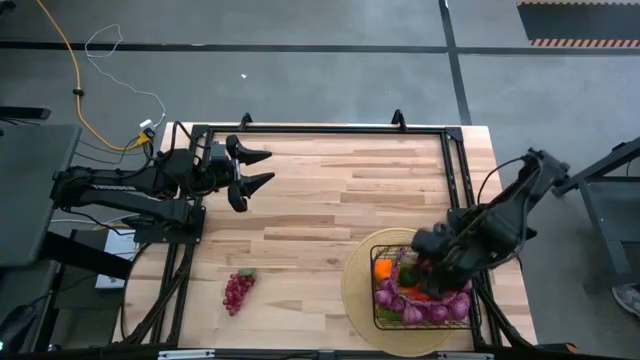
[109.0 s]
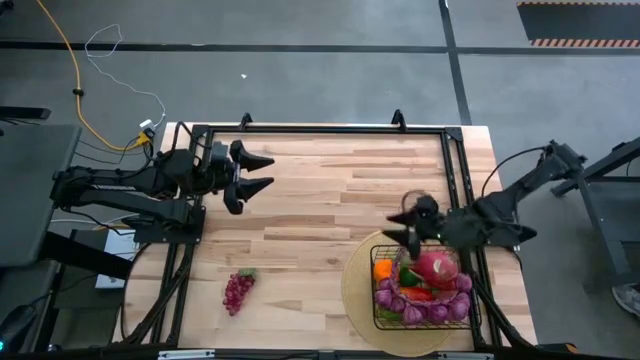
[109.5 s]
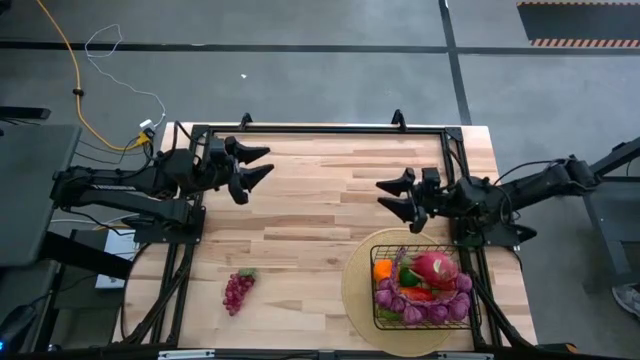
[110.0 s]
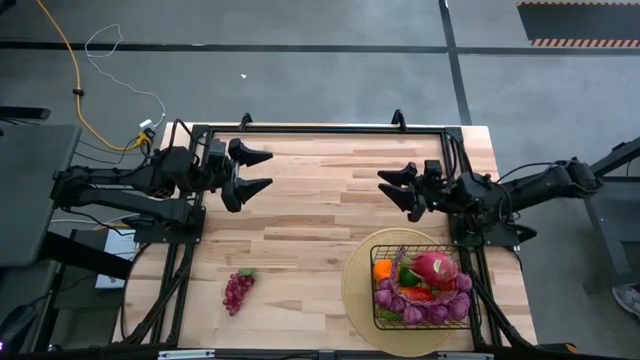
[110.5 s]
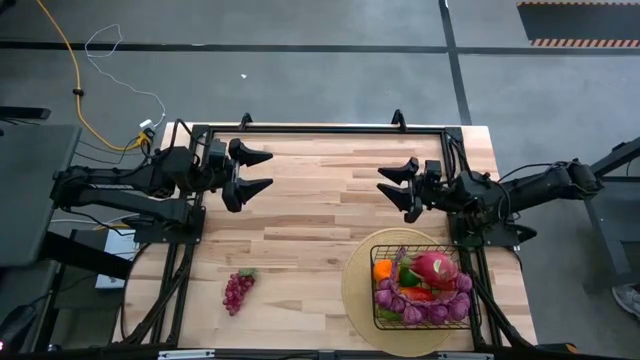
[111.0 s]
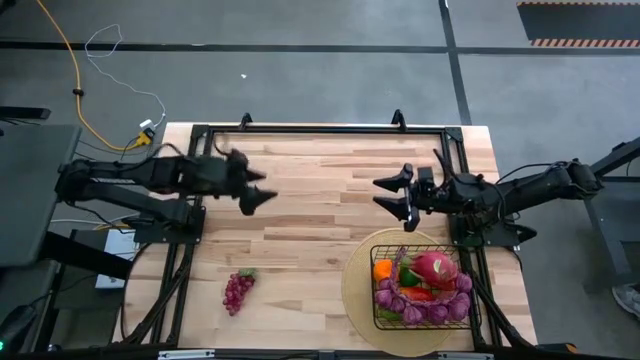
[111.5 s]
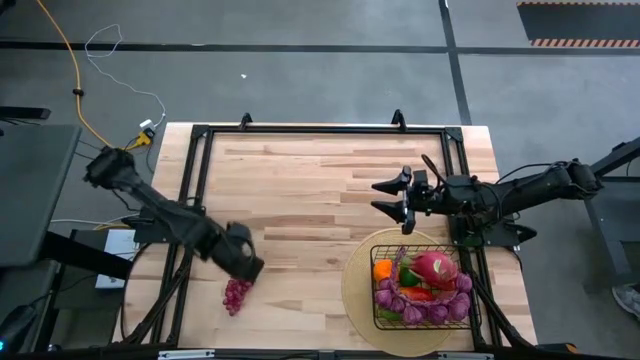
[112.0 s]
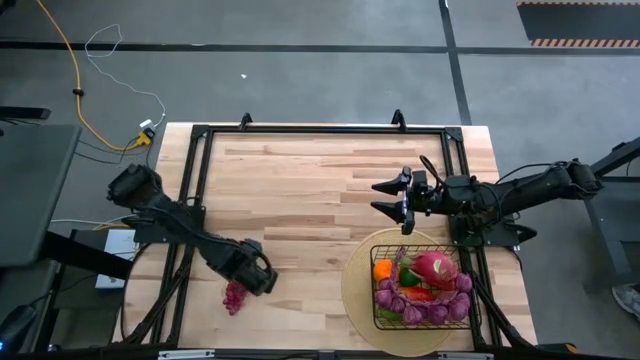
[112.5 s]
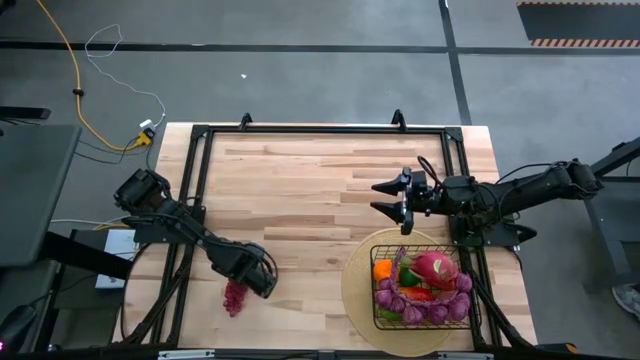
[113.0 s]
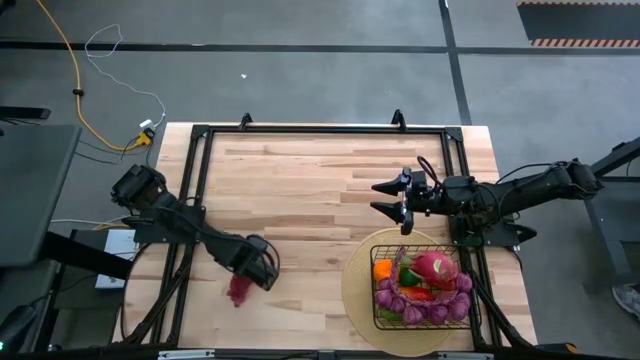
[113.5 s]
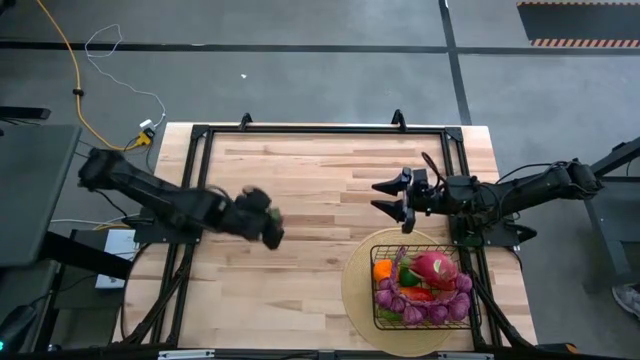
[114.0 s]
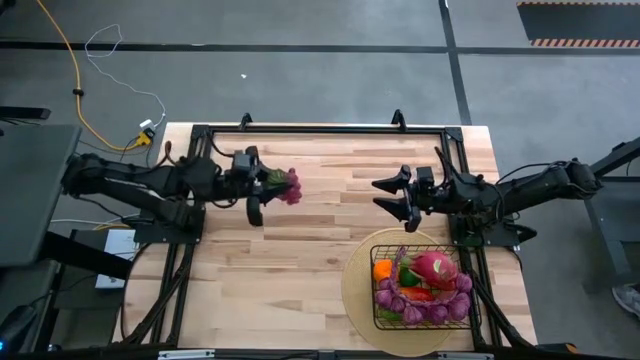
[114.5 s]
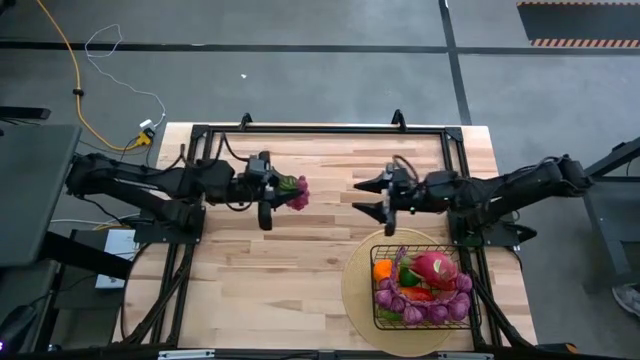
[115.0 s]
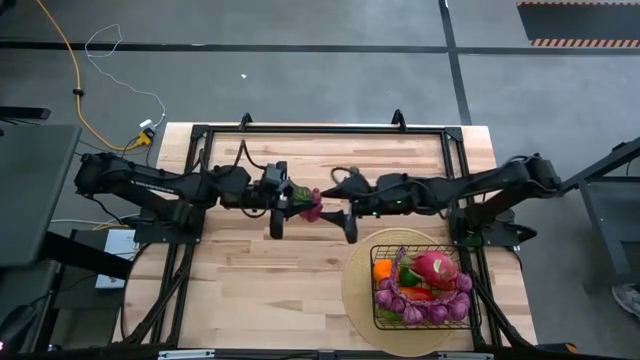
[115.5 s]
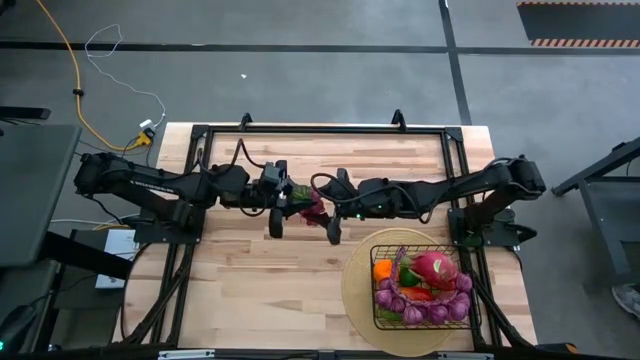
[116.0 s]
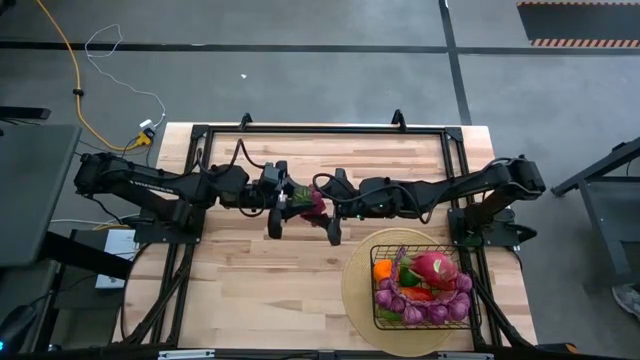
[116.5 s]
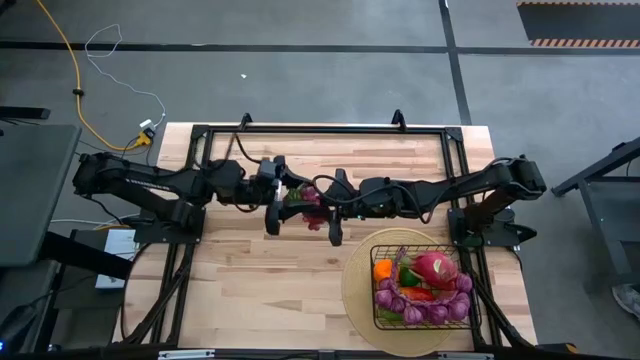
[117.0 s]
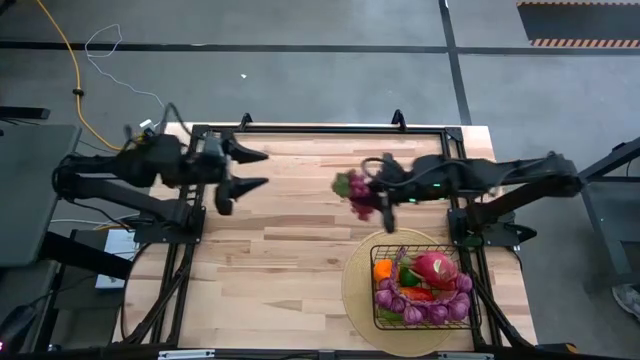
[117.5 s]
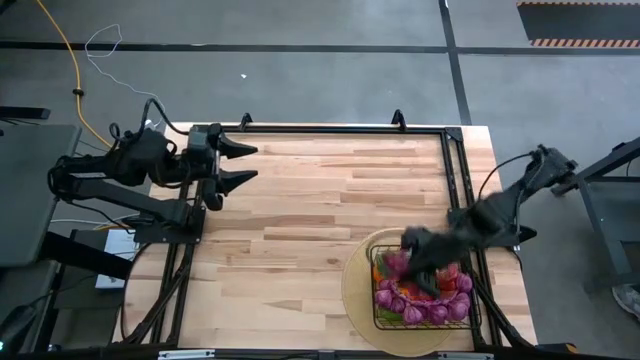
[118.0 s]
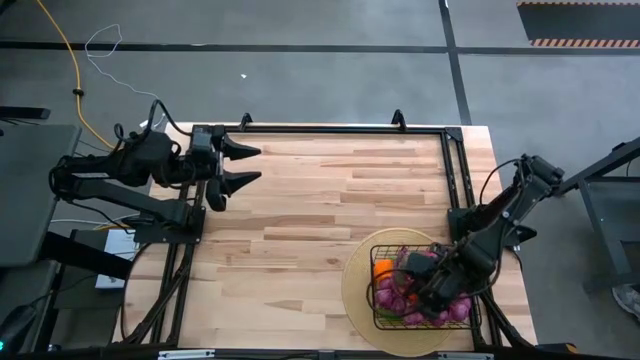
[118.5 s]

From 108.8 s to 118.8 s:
Task: Build produce basket
Put the grapes into the wire basket

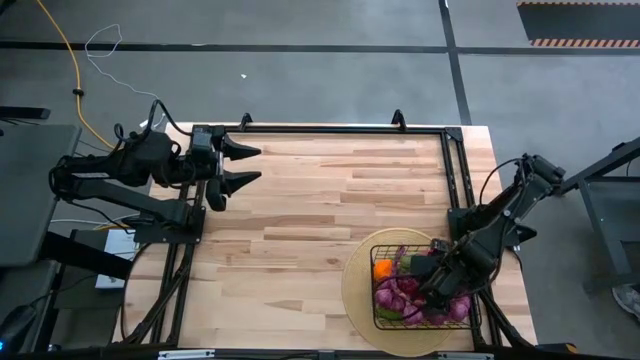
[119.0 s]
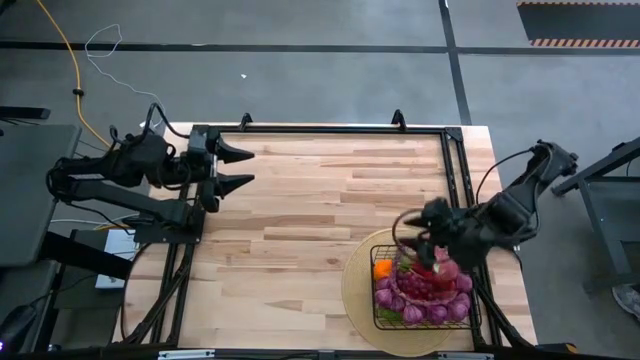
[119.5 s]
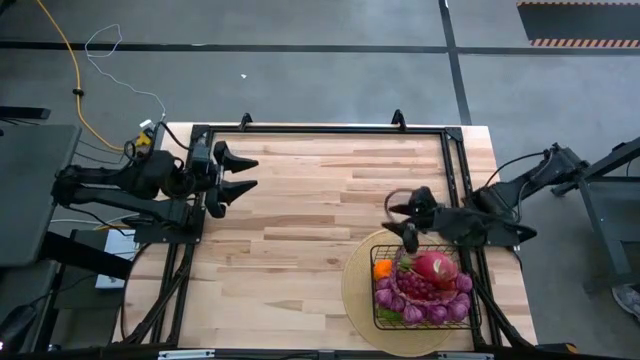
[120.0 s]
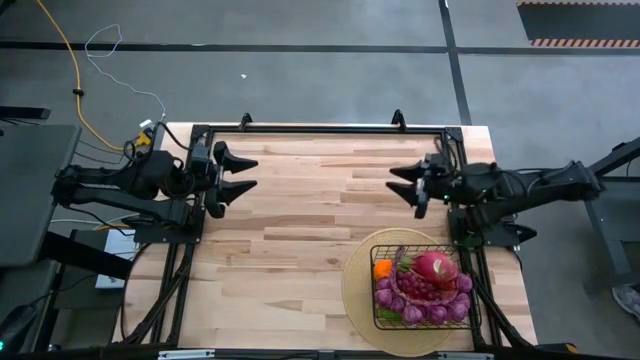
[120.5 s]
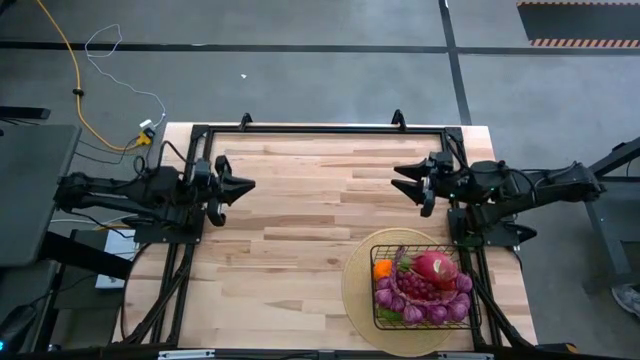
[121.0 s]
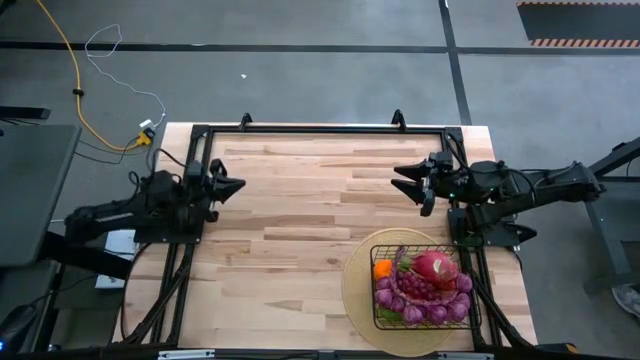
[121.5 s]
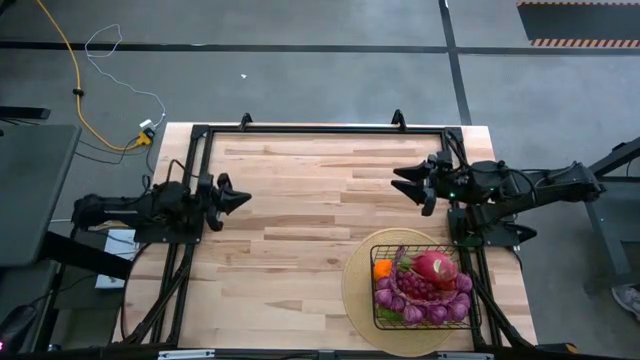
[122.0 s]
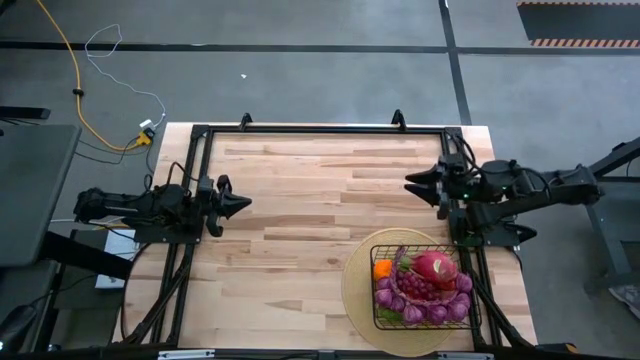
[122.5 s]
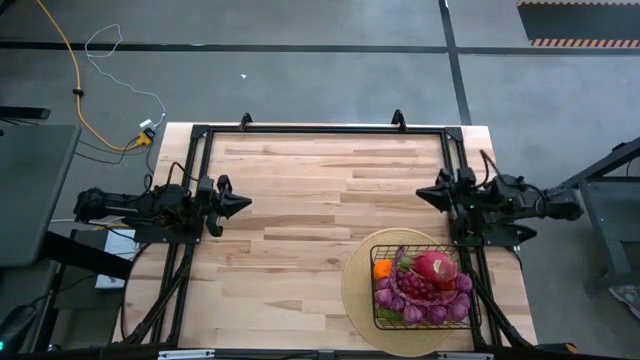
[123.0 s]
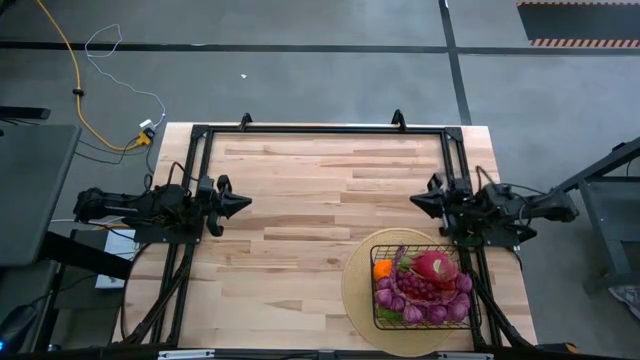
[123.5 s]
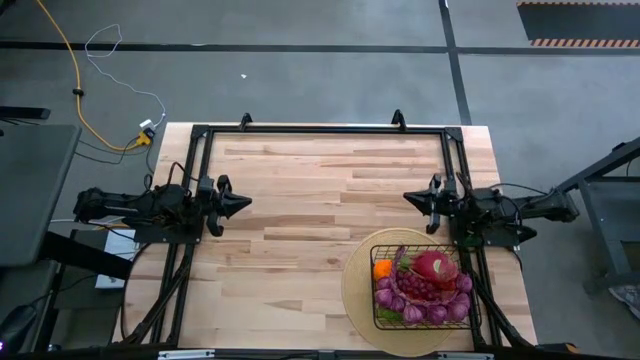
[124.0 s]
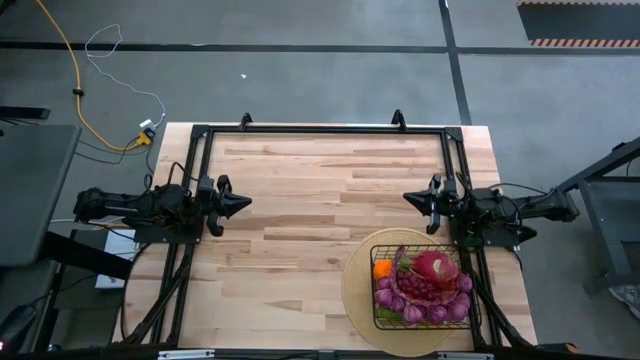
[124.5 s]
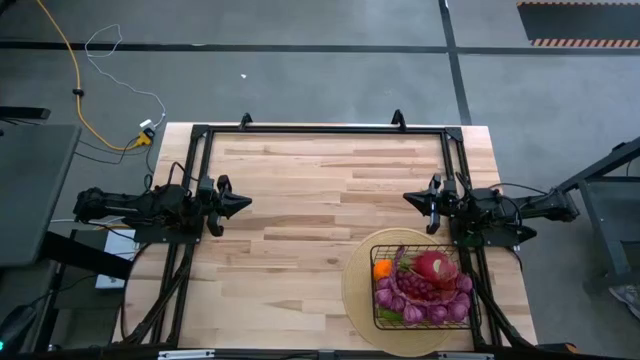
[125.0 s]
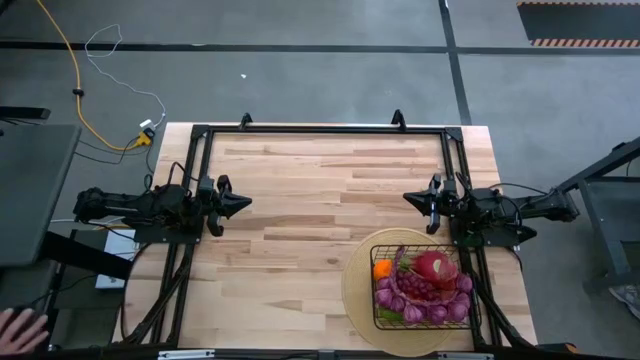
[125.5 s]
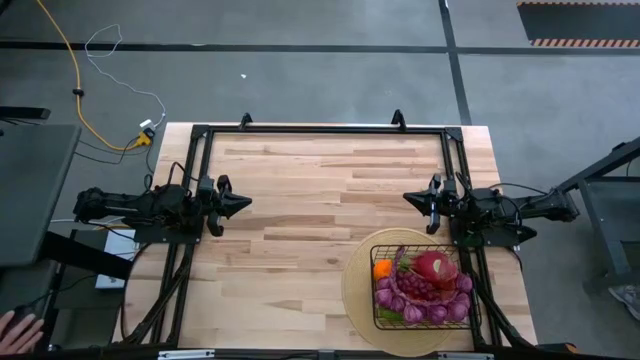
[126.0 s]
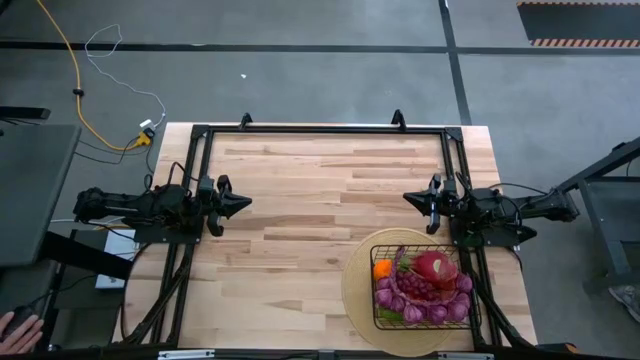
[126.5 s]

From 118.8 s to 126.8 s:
Return to Home Position

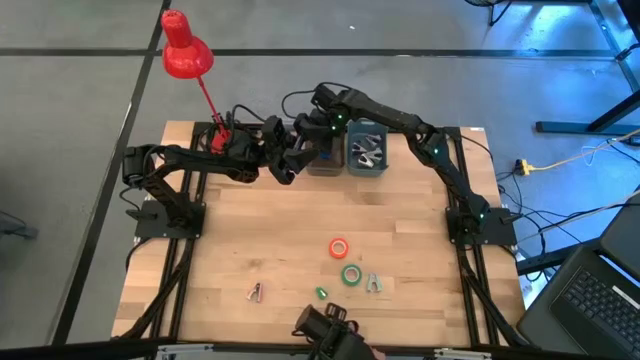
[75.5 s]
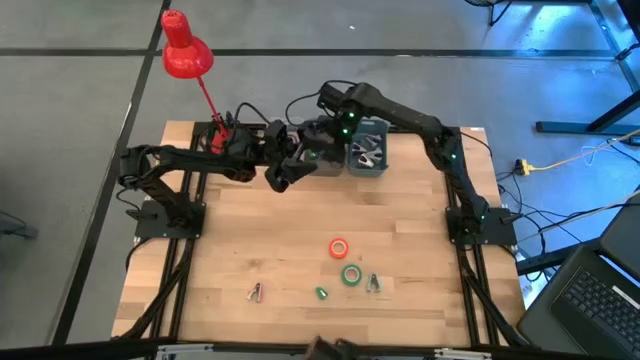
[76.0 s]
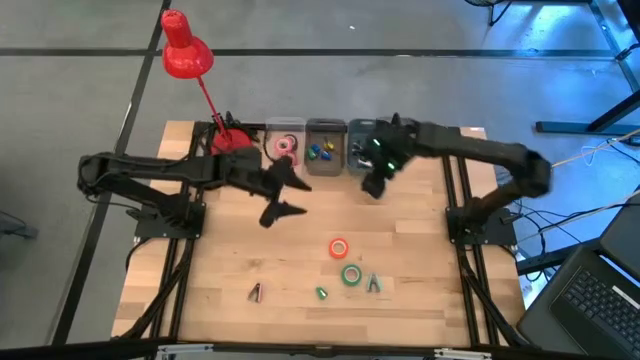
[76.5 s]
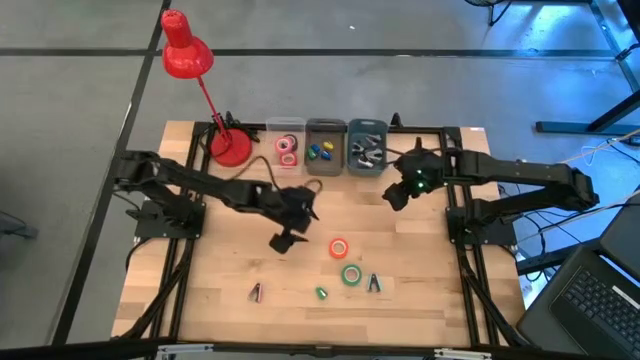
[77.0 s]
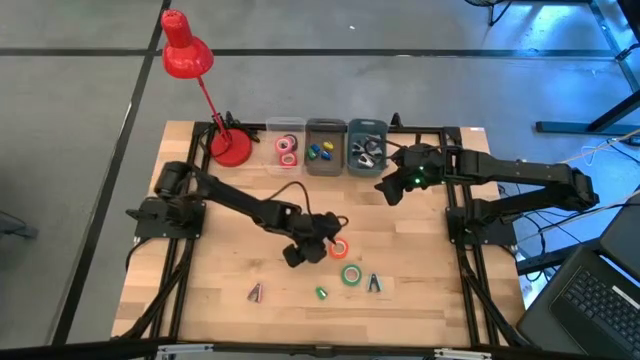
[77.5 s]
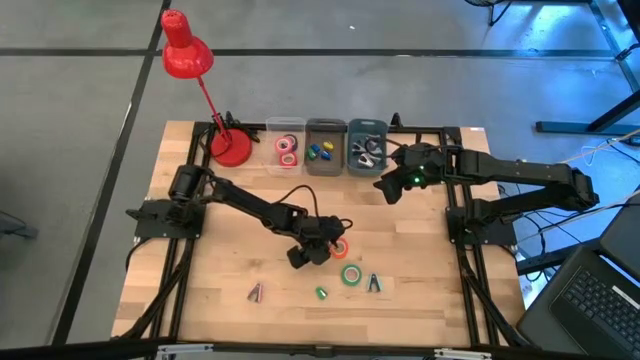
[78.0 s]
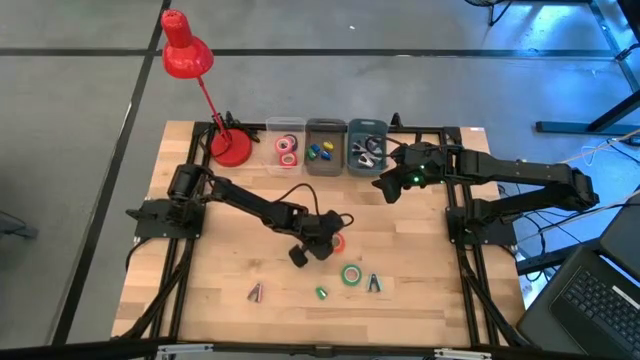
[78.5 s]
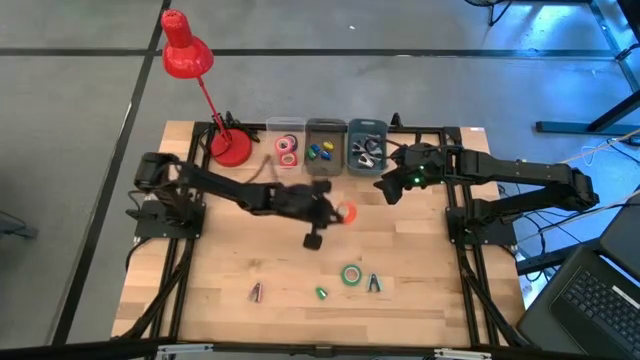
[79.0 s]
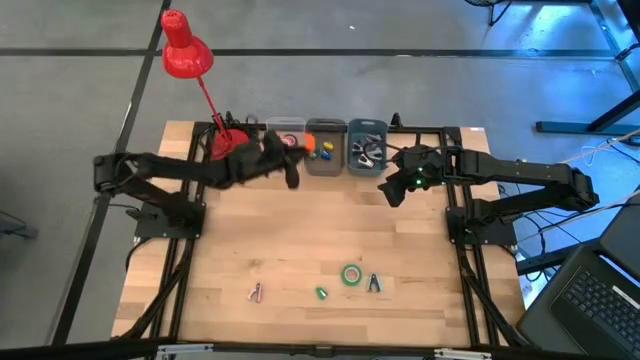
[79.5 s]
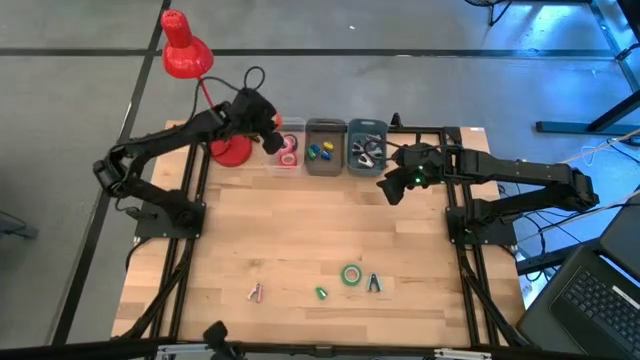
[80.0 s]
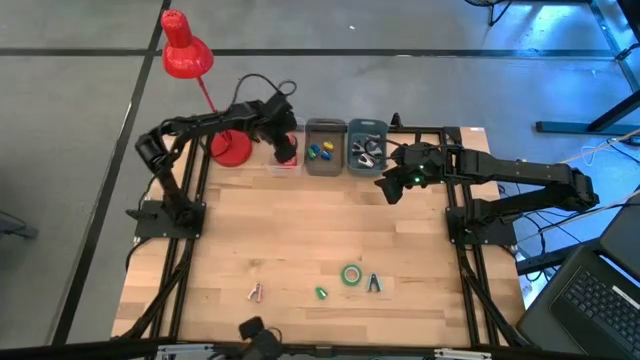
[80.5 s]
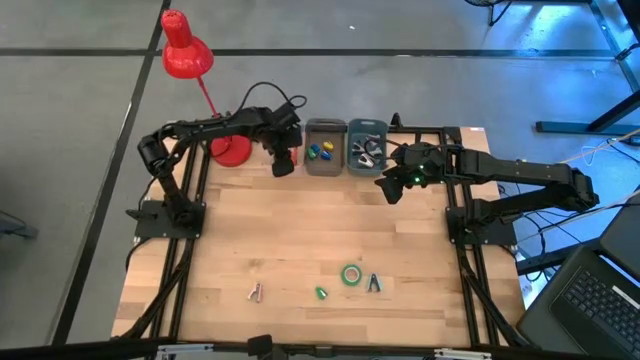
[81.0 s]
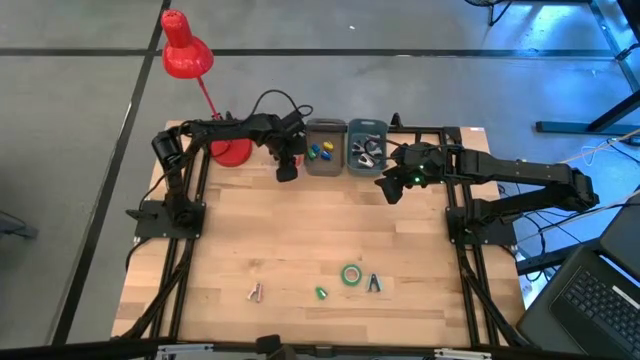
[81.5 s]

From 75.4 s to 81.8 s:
Task: Pick and place Stapler, Stapler remover, tape
Put the orange tape into the transparent bin
